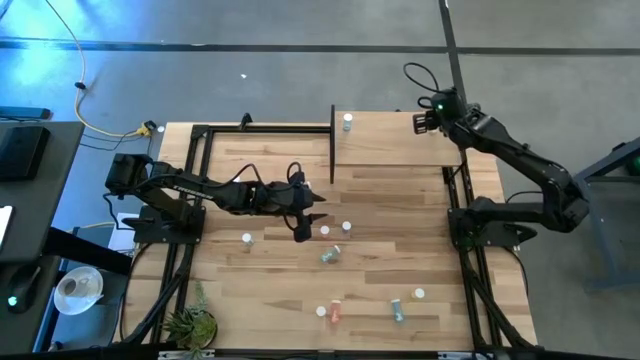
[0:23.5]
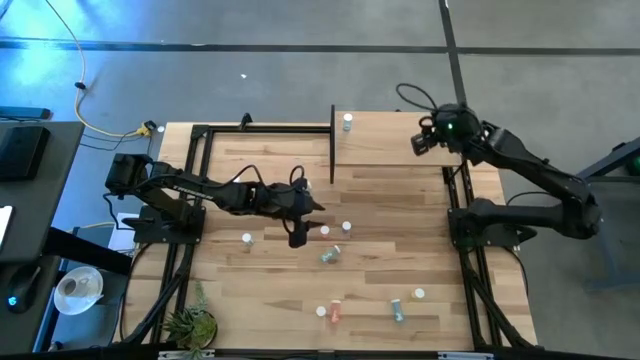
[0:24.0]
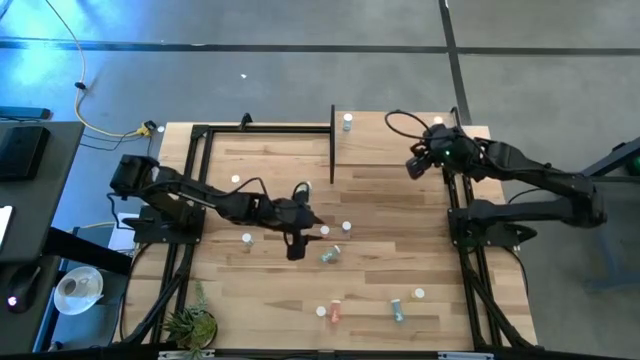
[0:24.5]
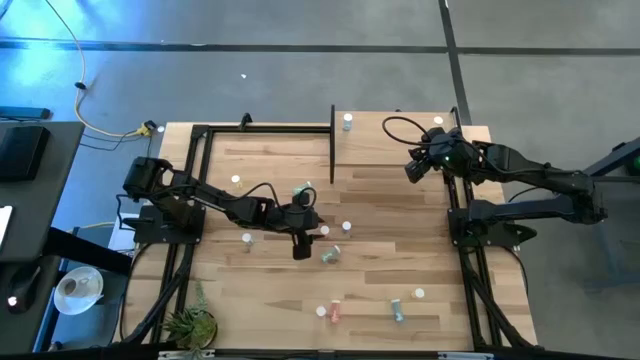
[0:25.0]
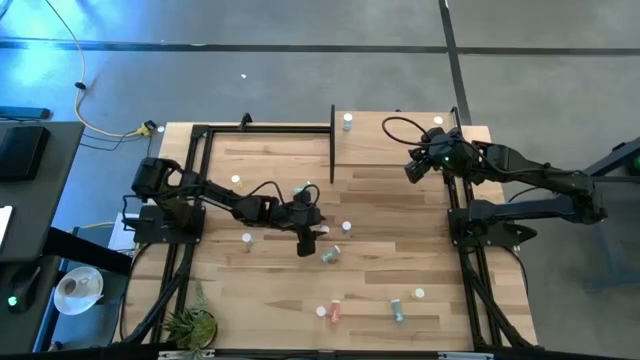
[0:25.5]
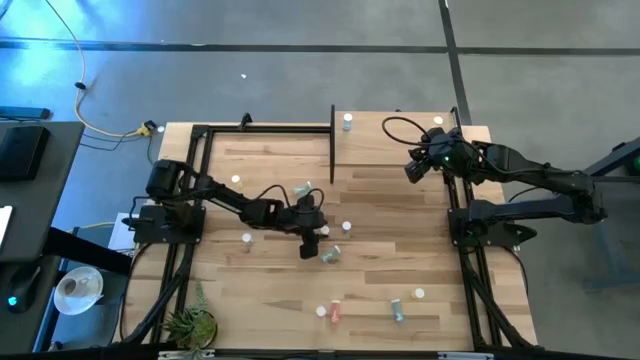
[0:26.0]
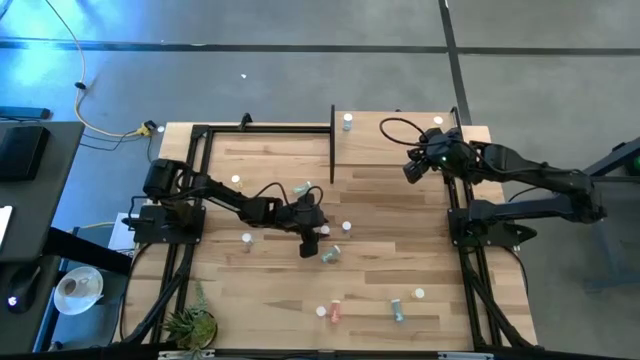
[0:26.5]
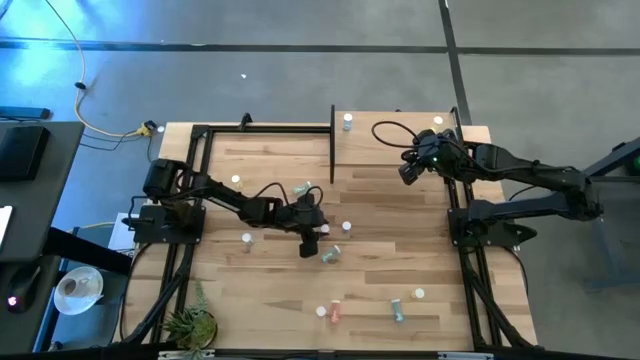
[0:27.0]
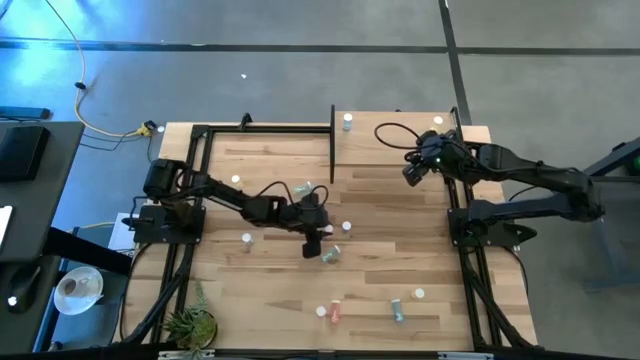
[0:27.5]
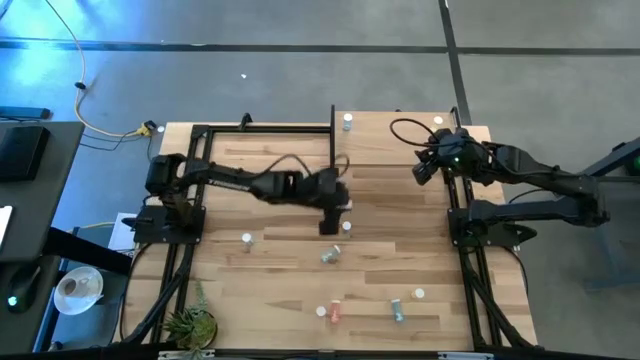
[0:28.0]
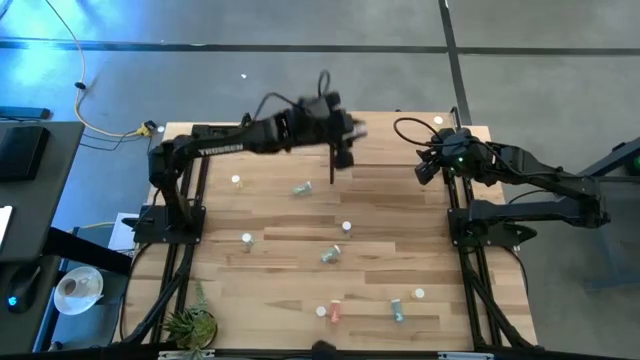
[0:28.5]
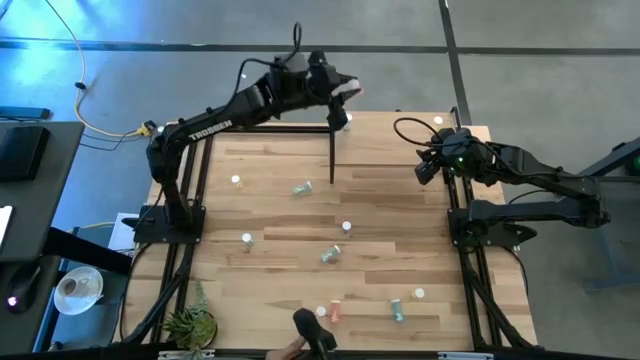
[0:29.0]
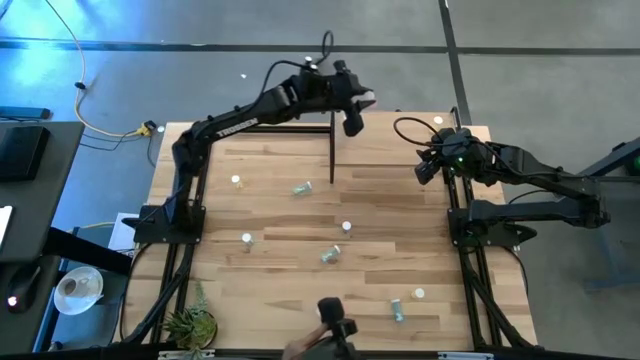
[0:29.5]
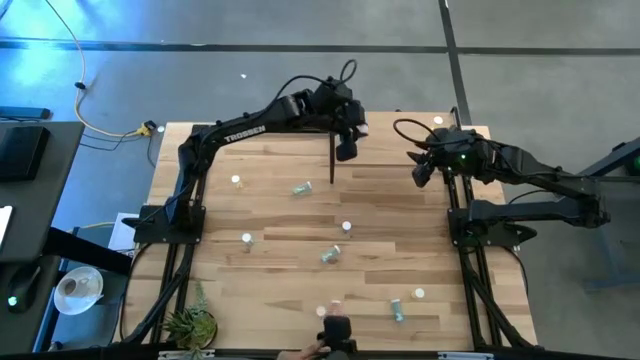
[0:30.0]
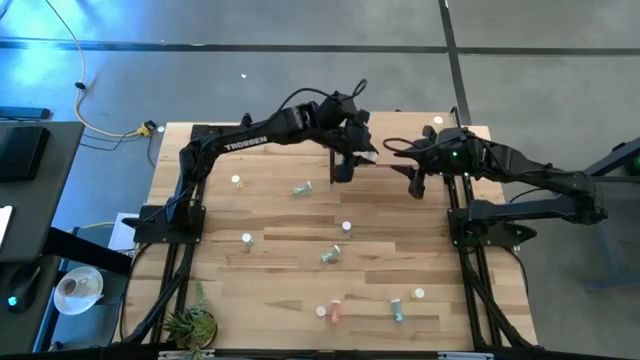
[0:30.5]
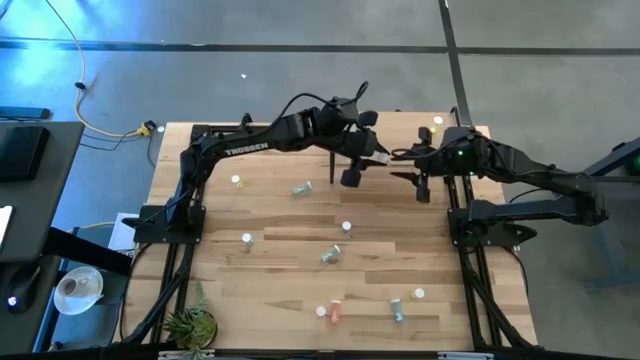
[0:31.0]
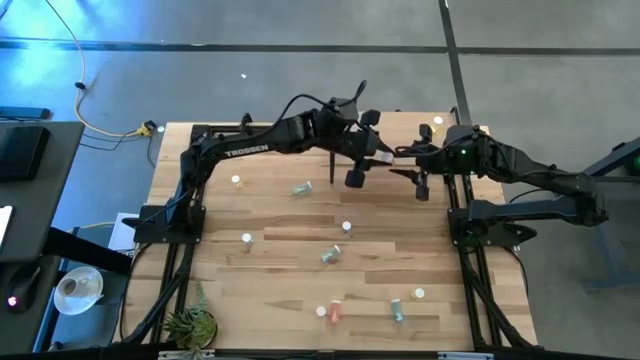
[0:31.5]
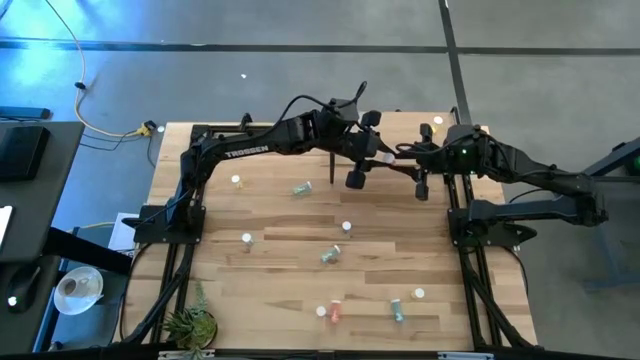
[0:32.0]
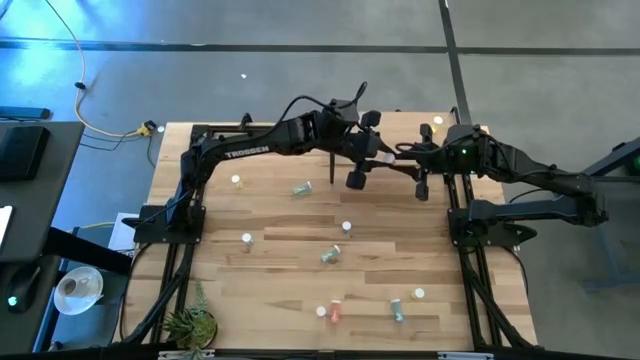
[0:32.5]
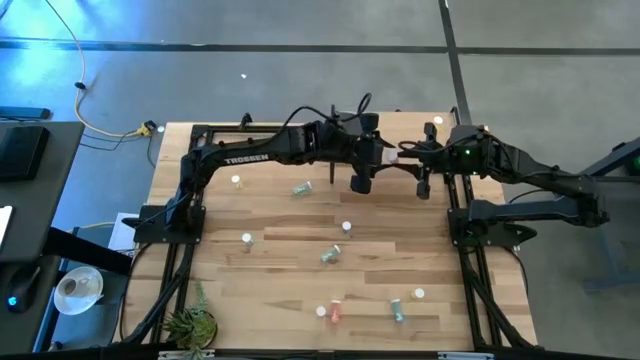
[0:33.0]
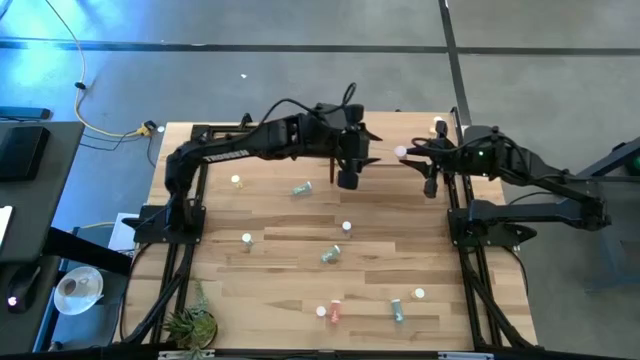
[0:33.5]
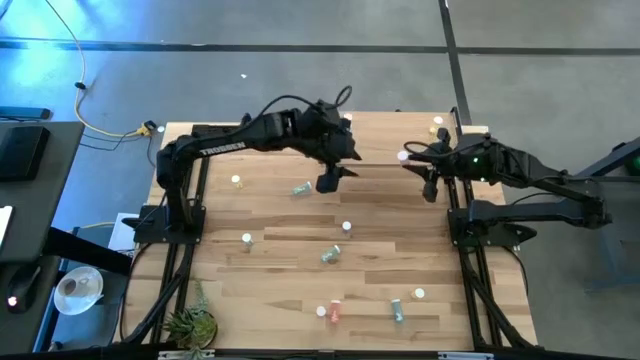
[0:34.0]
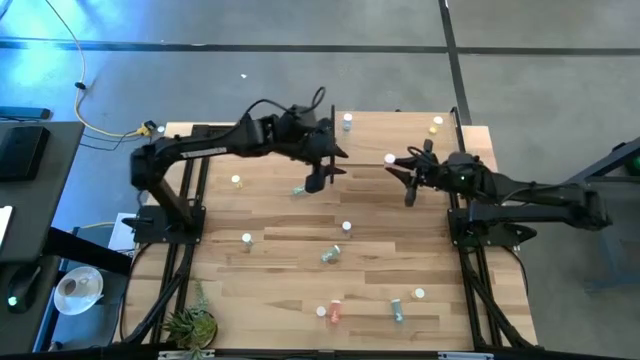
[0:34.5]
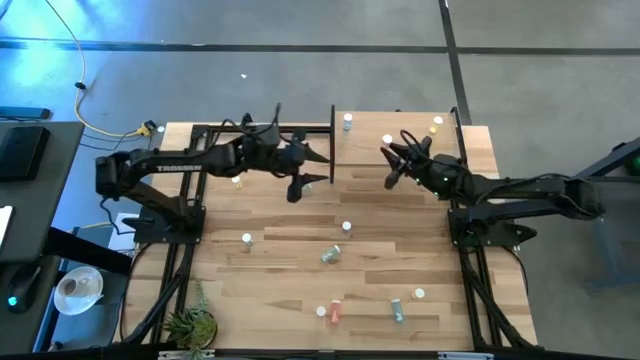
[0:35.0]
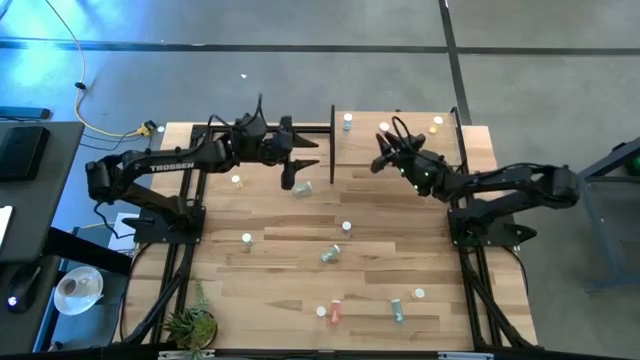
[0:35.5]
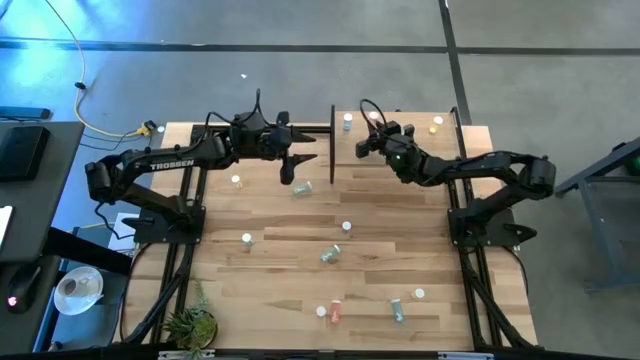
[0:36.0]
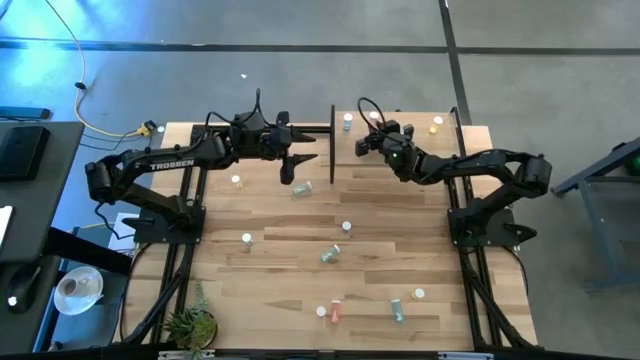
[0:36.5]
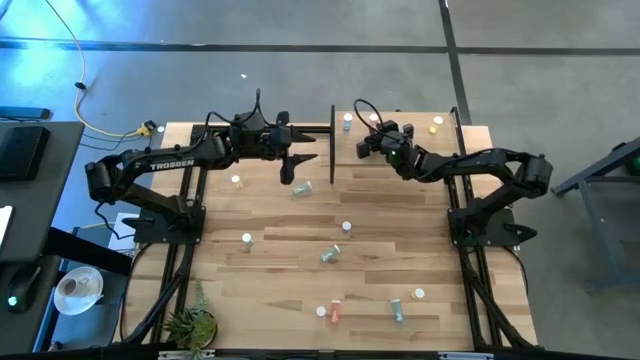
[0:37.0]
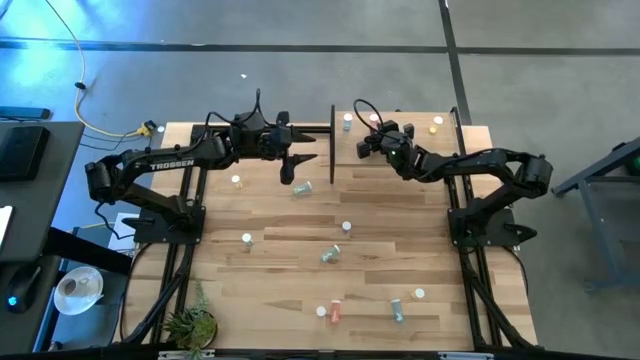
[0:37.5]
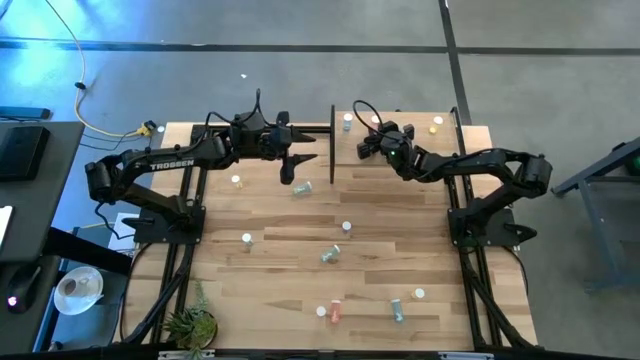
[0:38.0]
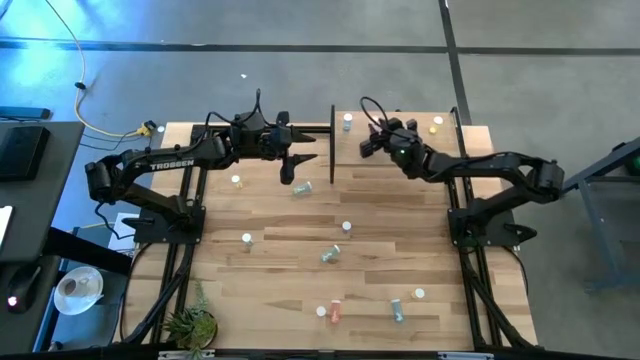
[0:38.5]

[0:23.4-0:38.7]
Task: Pick and place medicine bottles onto shelf by color
Put the top pink pill bottle on the shelf

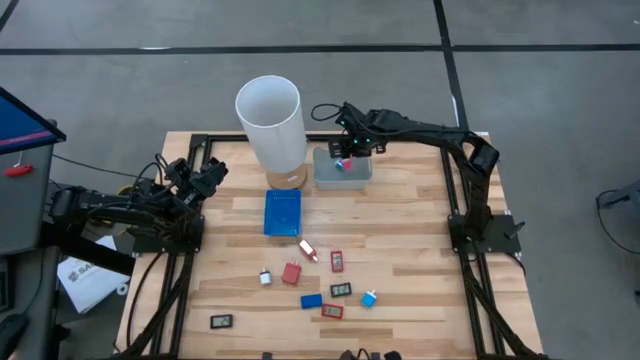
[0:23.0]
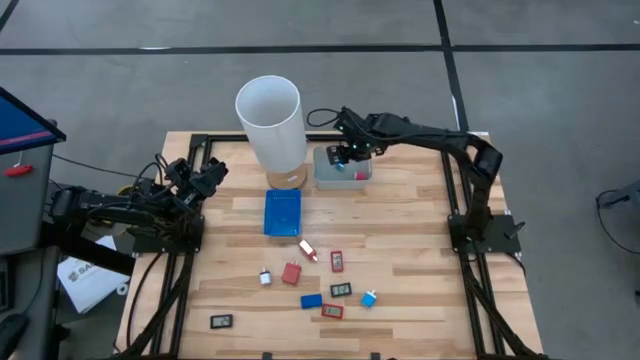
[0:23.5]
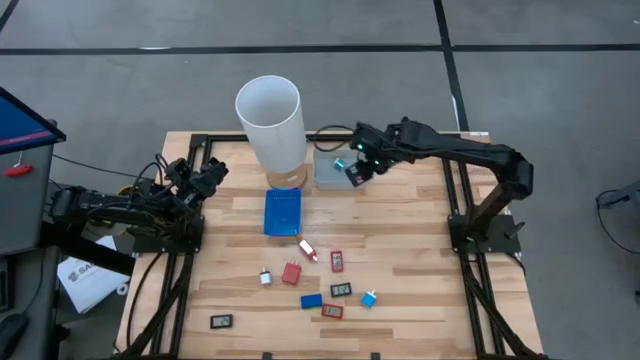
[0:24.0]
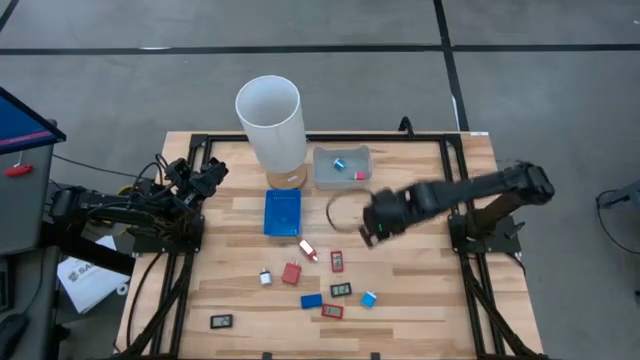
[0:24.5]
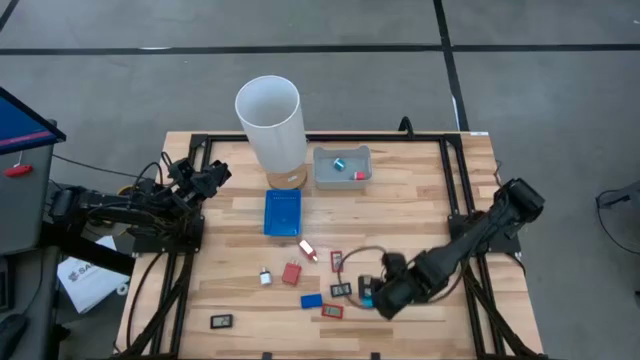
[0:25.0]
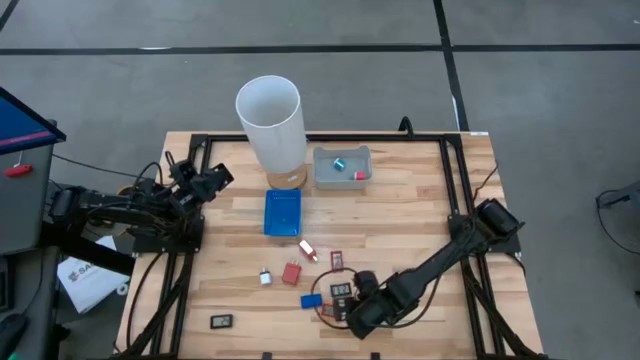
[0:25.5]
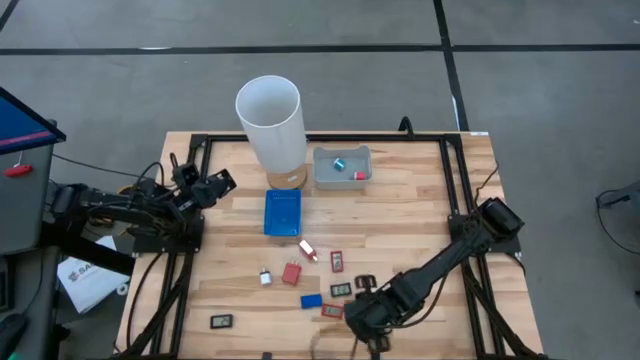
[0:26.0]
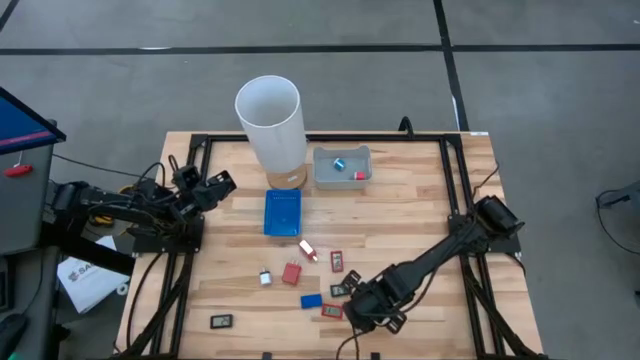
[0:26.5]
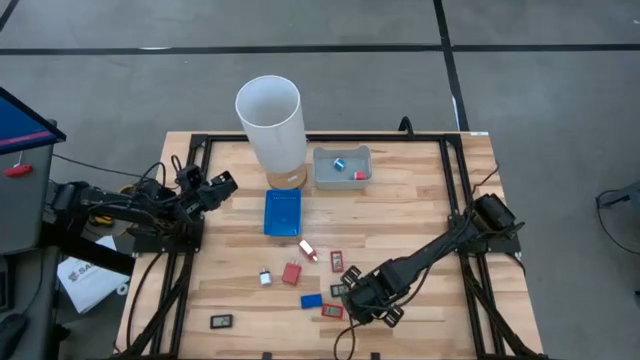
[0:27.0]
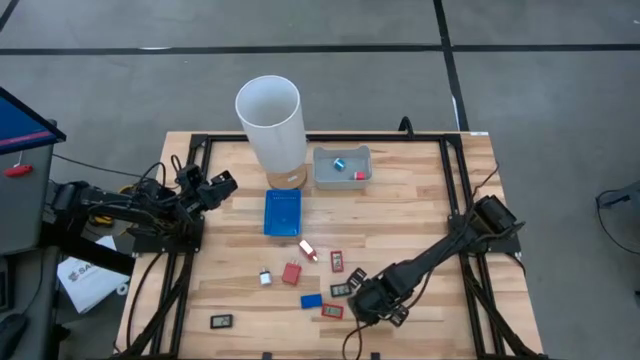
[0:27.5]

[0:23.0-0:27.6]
Task: Pick & Place Office items
Put the blue charger adapter into the gray bin
